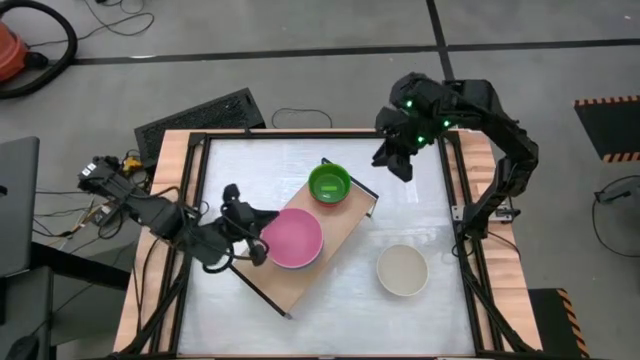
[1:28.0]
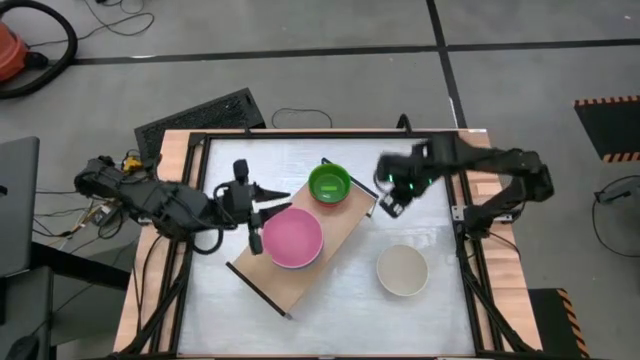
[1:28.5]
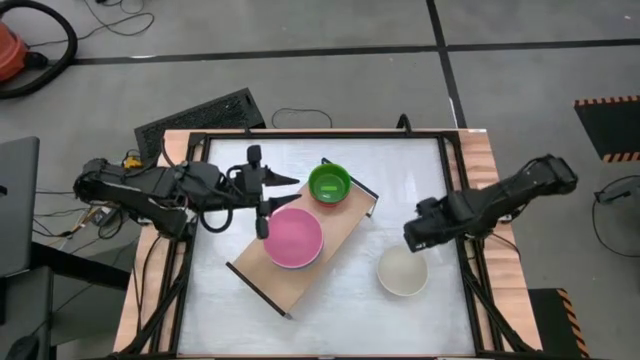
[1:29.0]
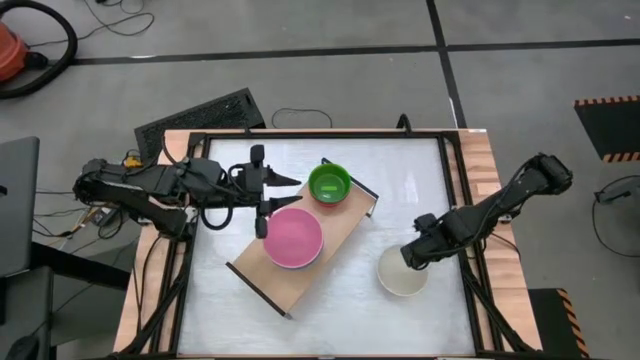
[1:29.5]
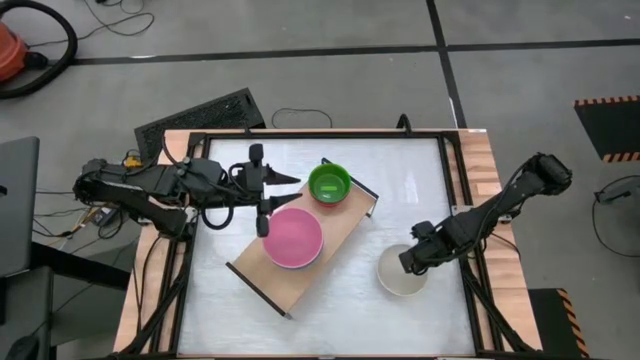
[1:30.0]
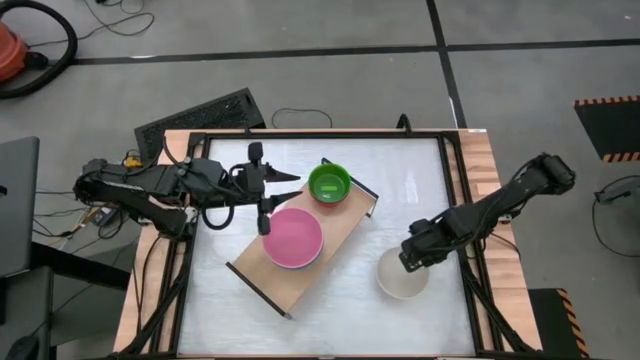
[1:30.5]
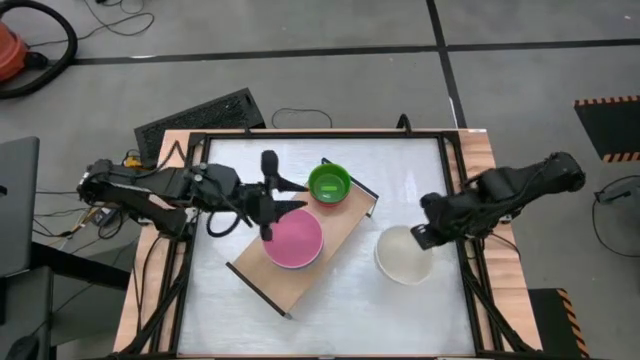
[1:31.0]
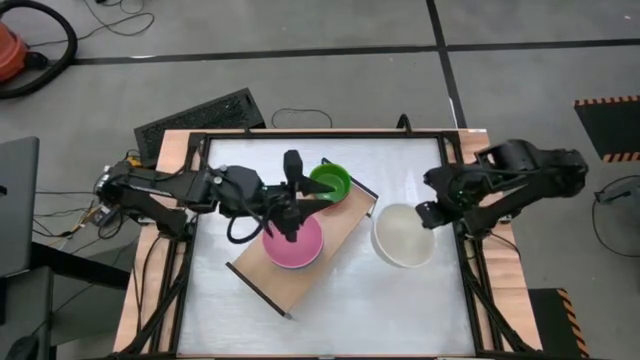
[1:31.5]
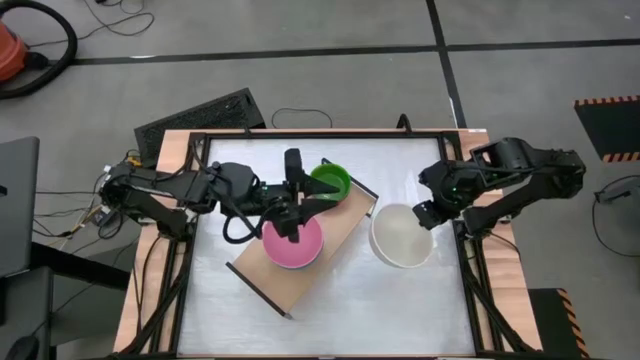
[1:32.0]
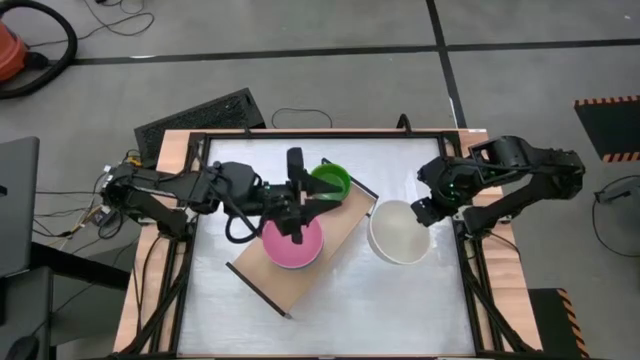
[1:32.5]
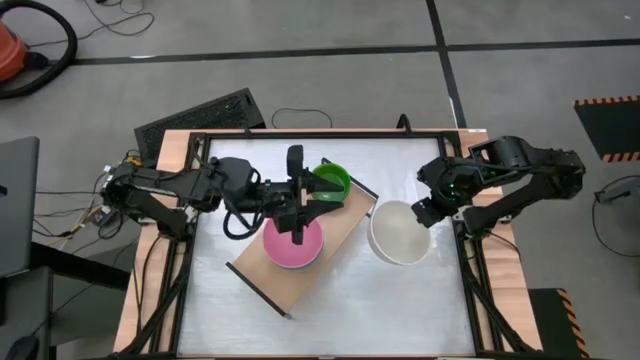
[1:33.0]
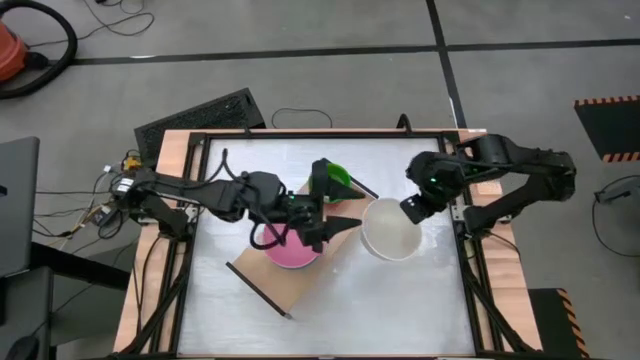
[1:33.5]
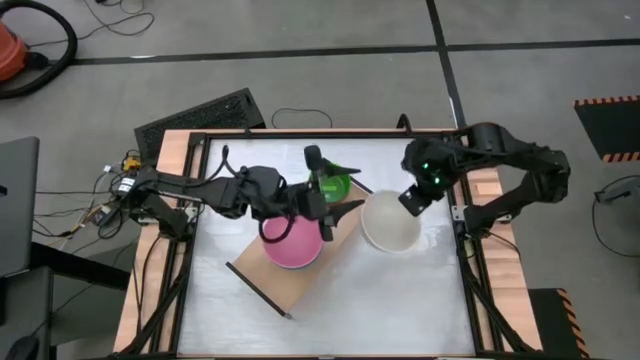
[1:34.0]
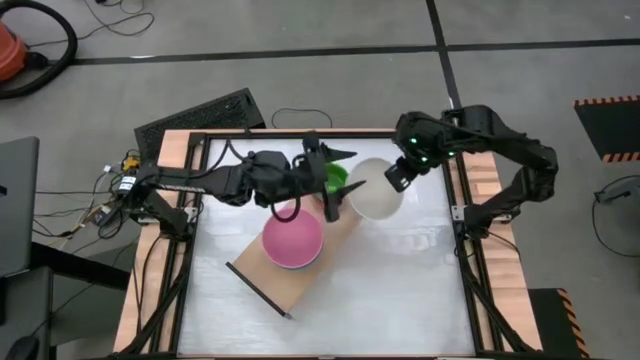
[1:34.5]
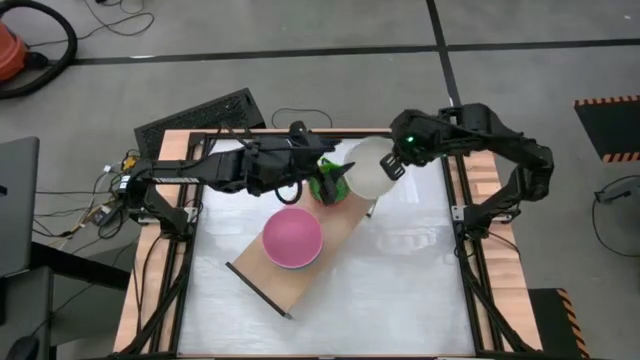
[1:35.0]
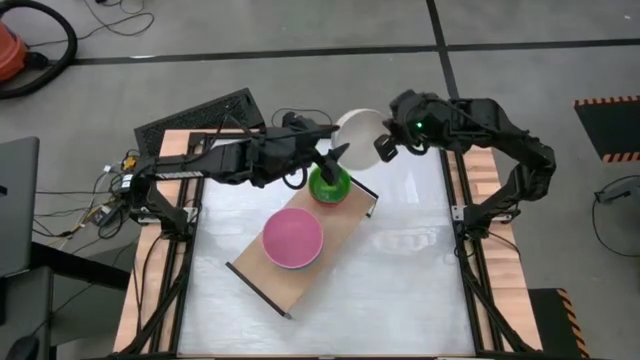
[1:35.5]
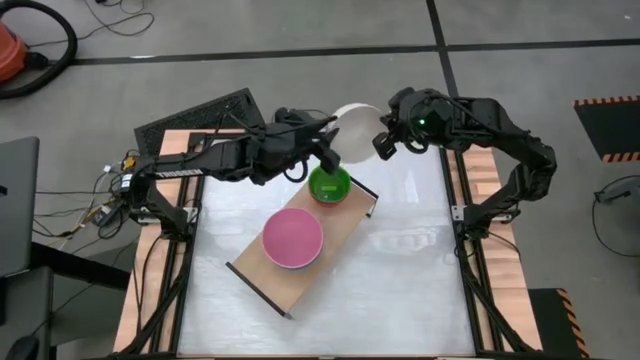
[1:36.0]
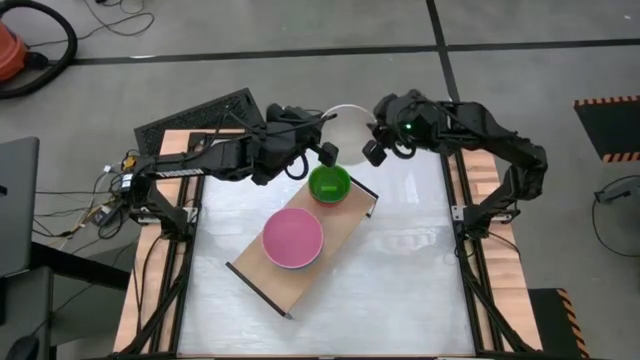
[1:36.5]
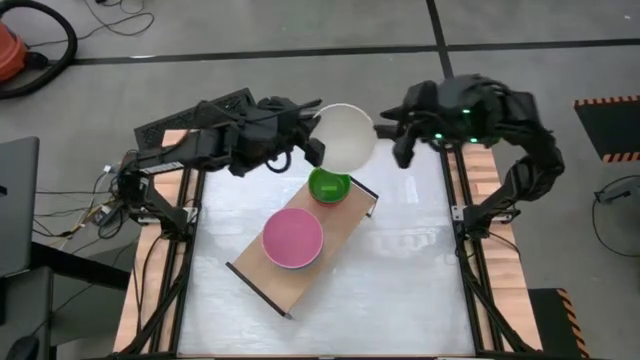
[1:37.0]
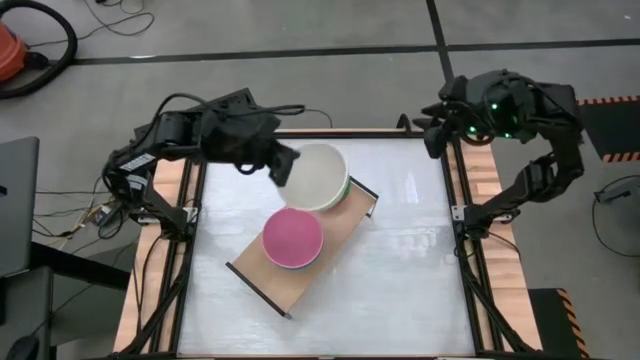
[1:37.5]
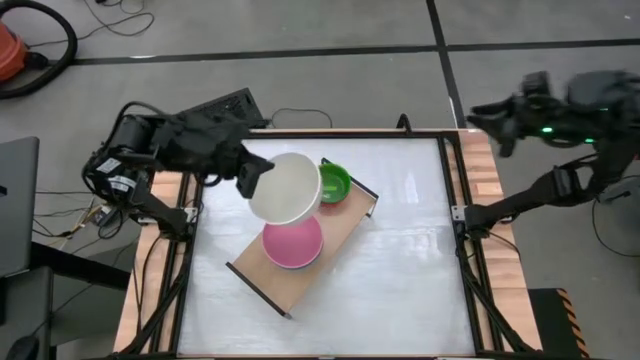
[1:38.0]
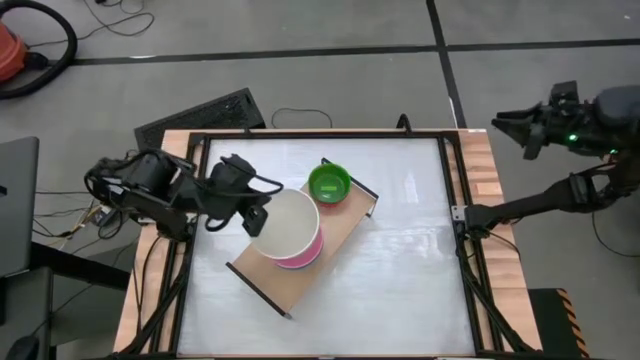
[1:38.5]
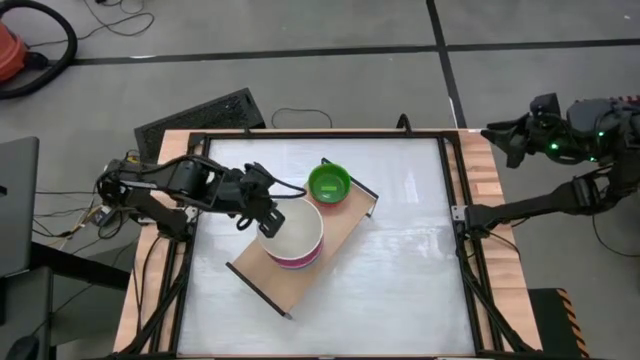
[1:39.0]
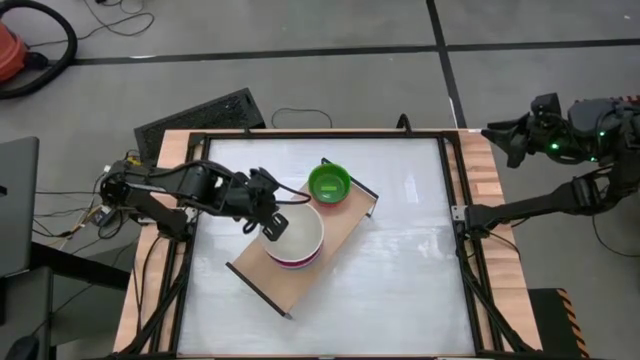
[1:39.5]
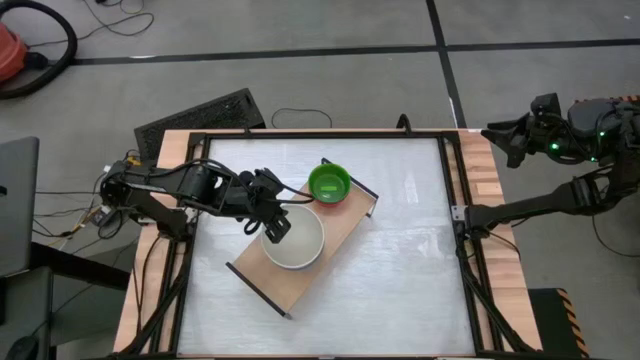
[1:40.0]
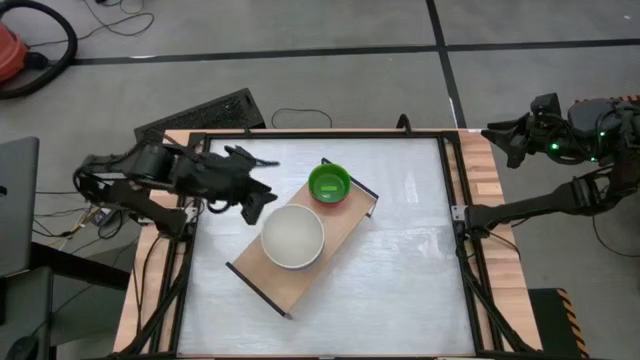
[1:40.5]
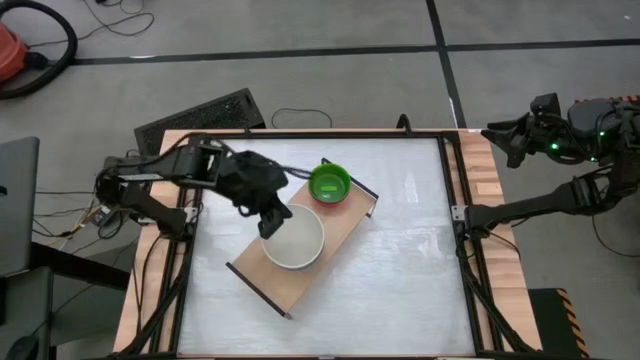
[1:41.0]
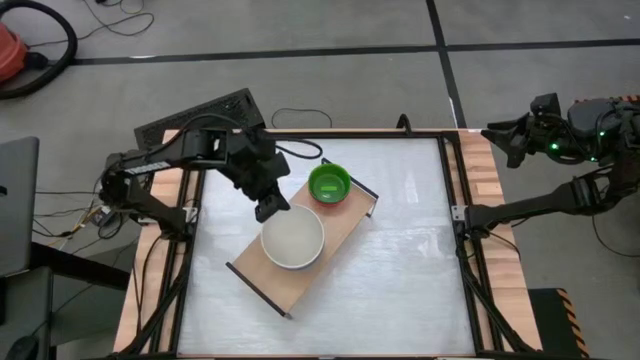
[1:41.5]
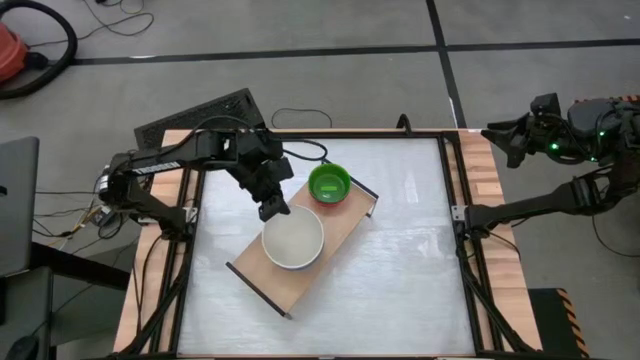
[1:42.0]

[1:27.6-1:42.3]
Task: Place and stack bowls onto a shelf
Stack the white bowl onto the pink bowl on the shelf

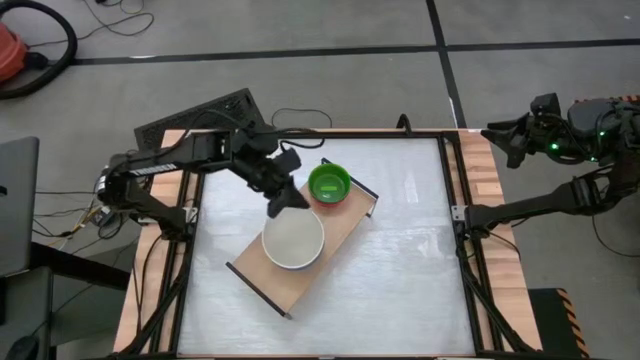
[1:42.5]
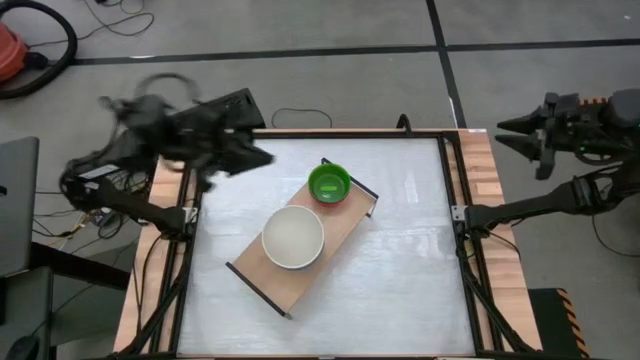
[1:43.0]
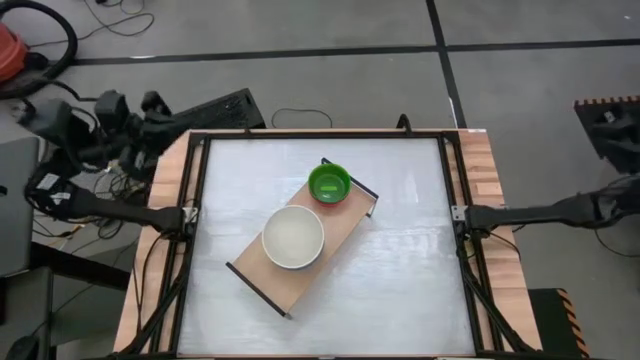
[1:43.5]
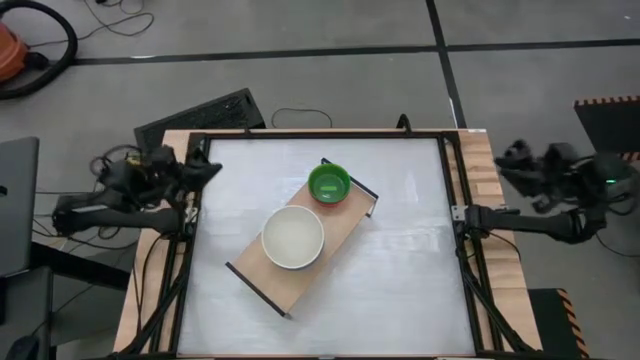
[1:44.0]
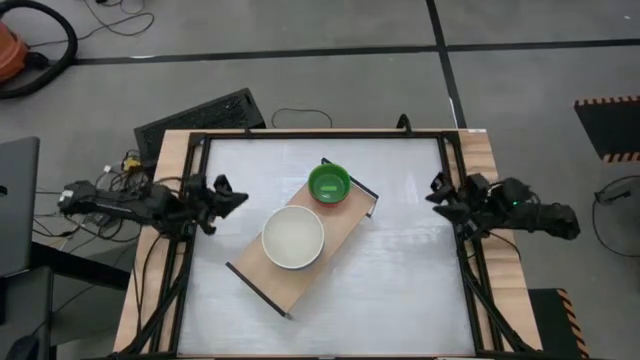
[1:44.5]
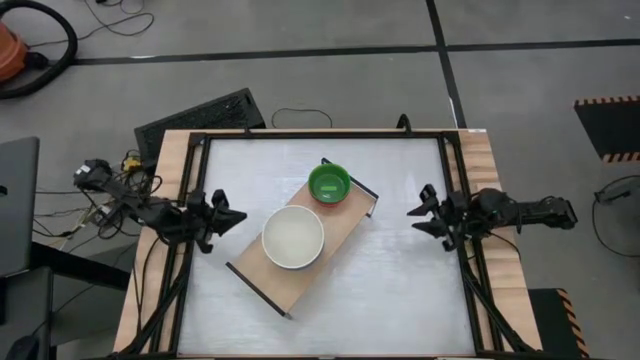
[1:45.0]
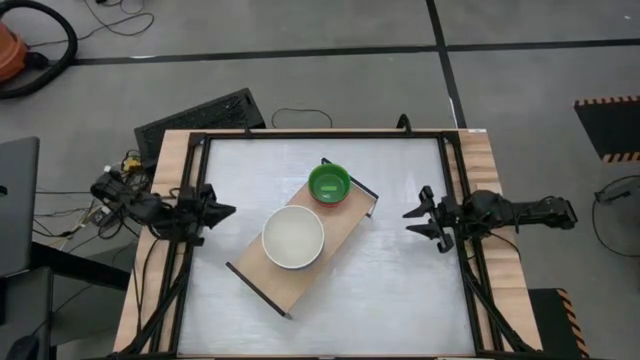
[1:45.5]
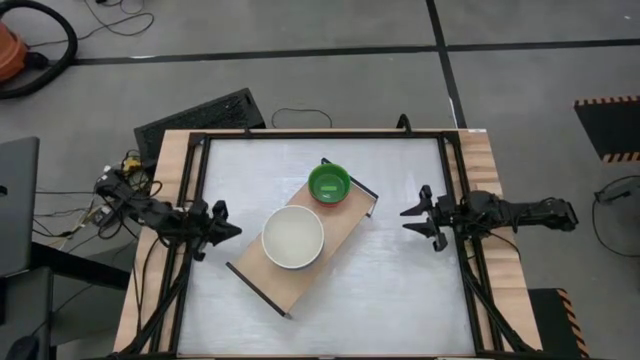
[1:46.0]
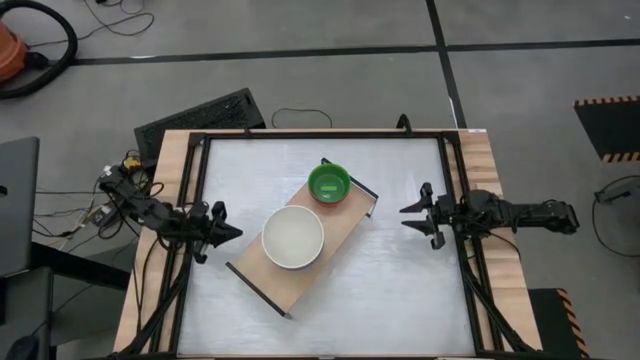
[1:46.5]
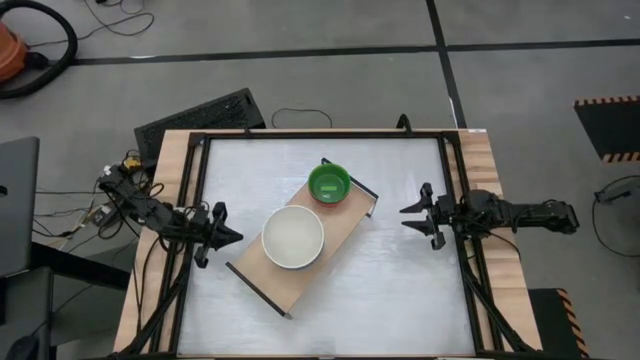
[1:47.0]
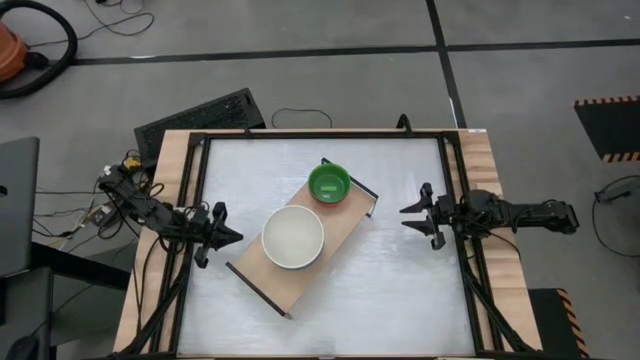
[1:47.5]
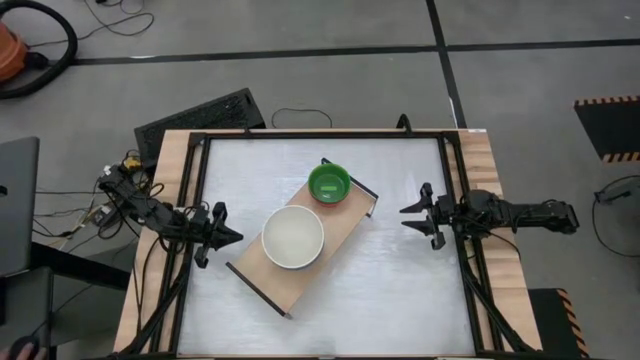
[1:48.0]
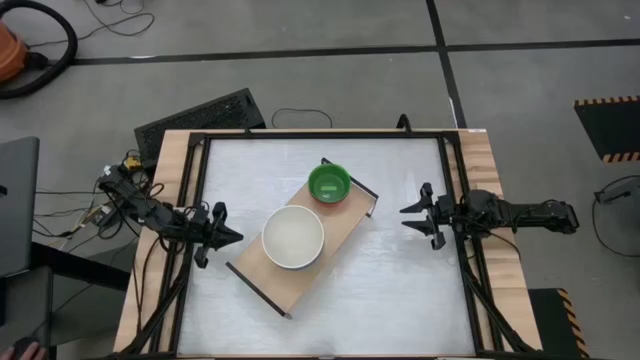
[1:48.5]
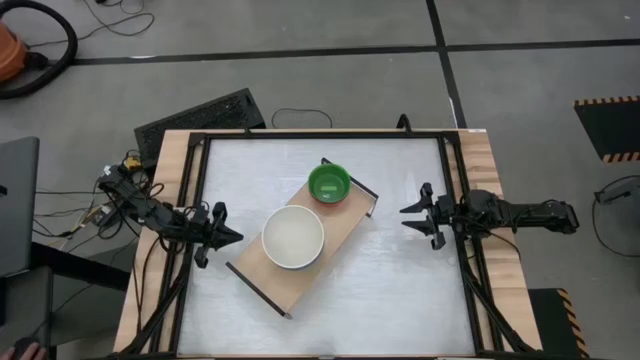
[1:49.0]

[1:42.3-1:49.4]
Return to Home Position

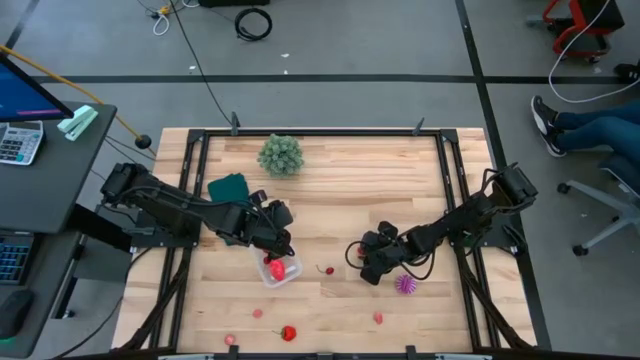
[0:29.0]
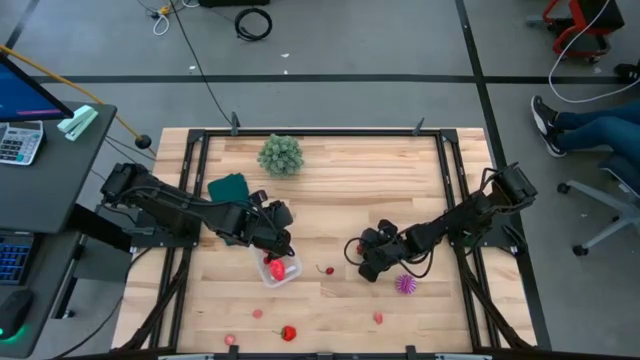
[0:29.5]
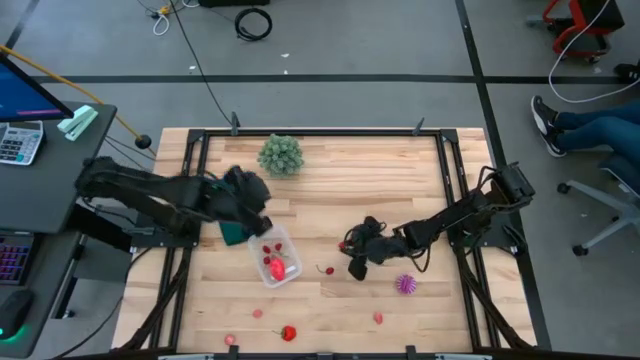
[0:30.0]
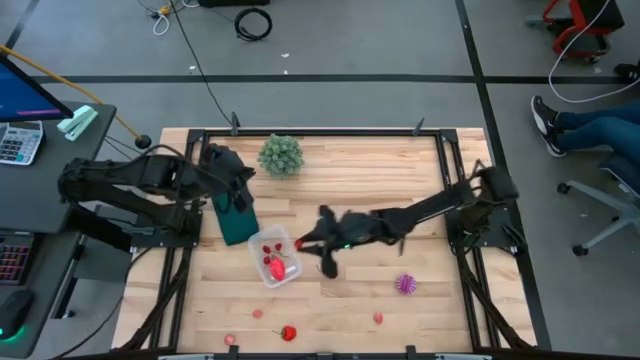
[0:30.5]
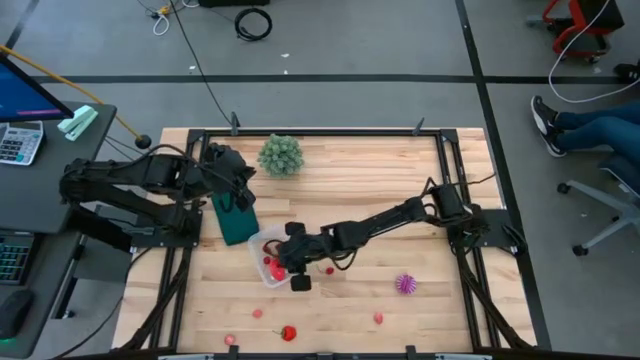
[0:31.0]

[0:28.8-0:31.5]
Task: Pick and placing Produce into tupperware
Put the red raspberry into the transparent bin
